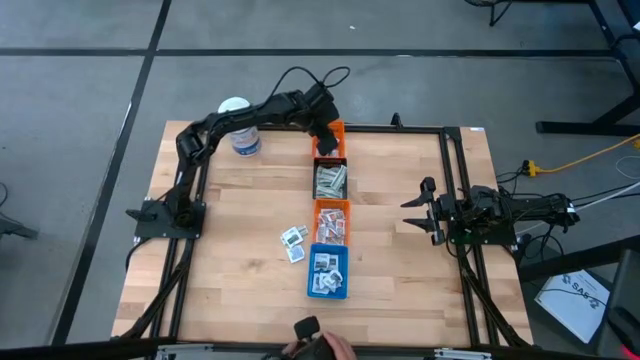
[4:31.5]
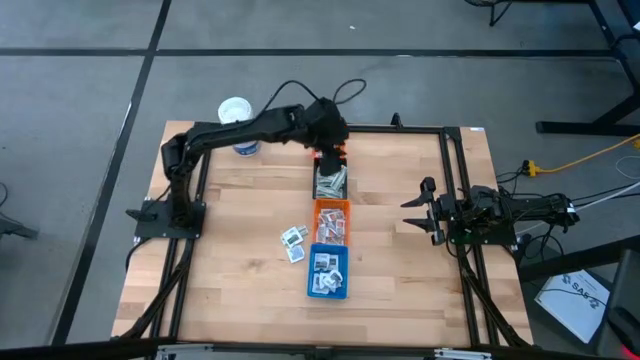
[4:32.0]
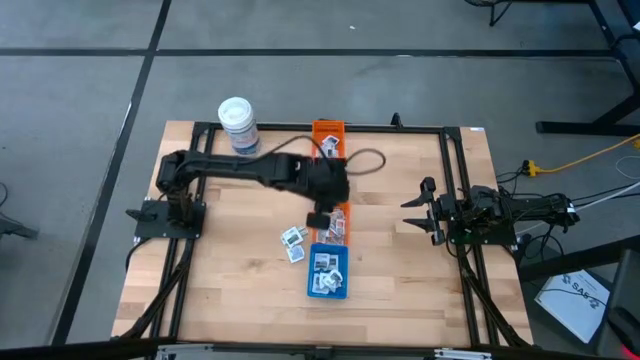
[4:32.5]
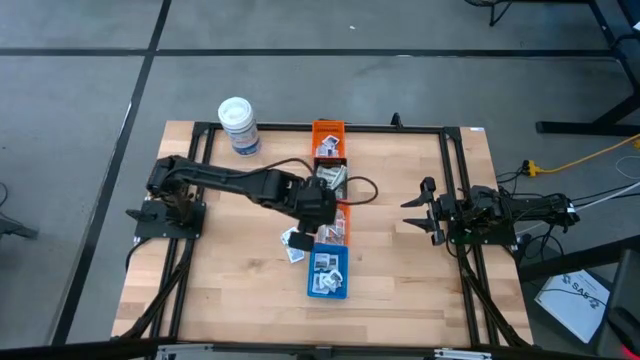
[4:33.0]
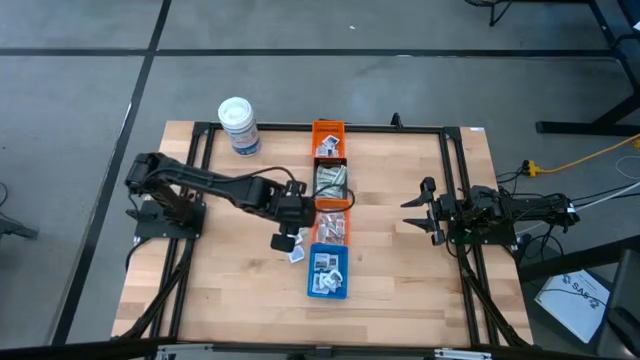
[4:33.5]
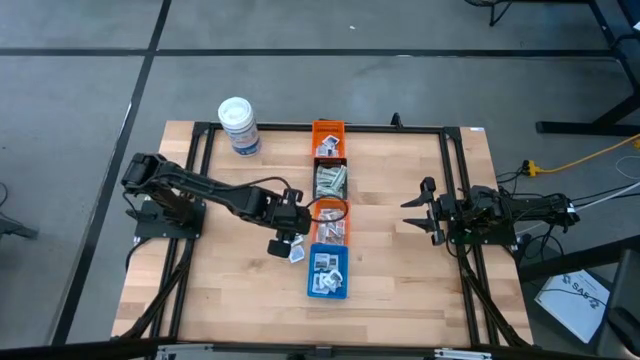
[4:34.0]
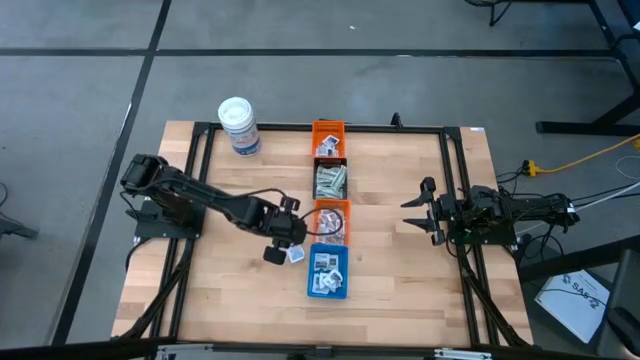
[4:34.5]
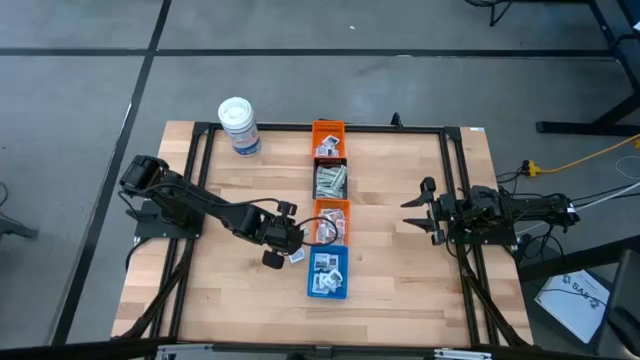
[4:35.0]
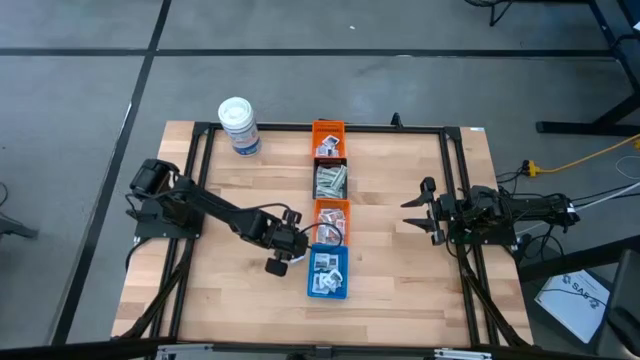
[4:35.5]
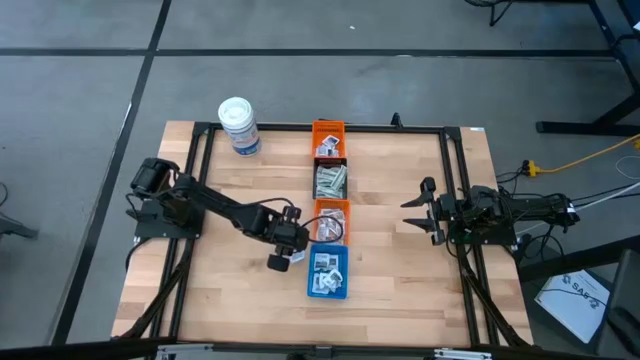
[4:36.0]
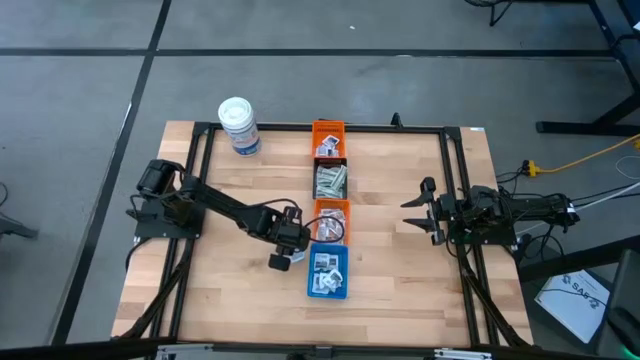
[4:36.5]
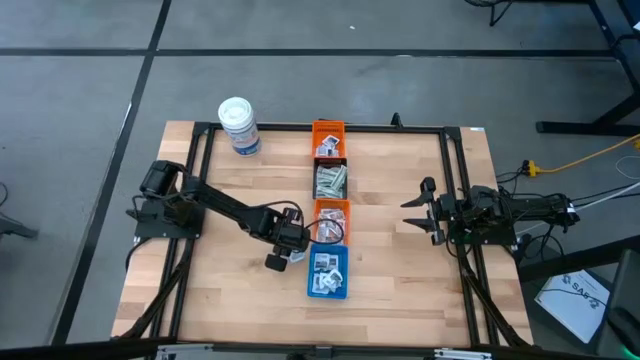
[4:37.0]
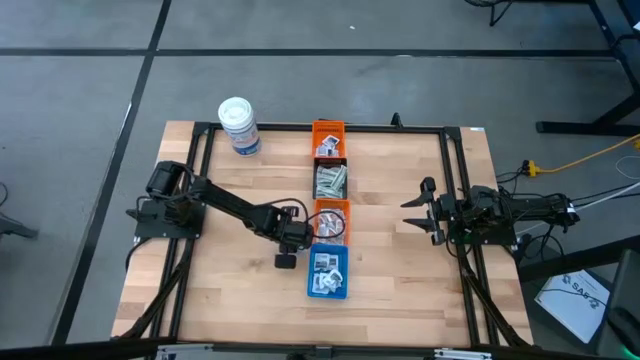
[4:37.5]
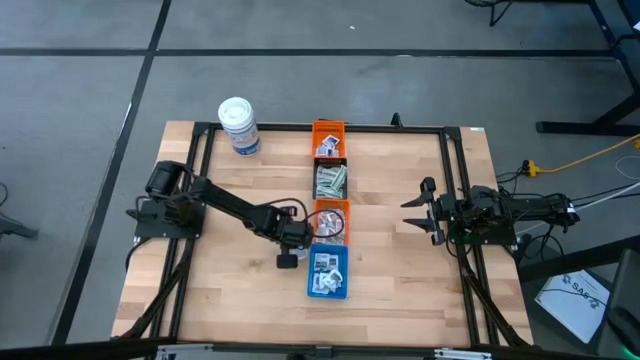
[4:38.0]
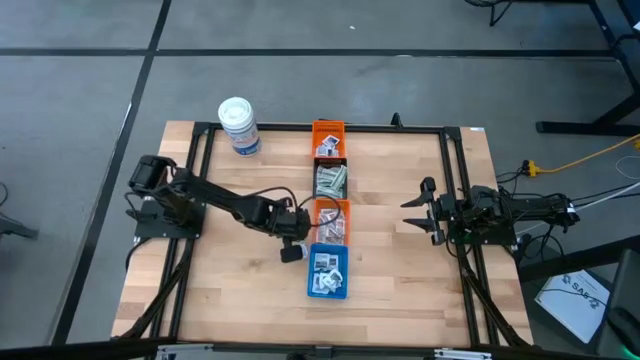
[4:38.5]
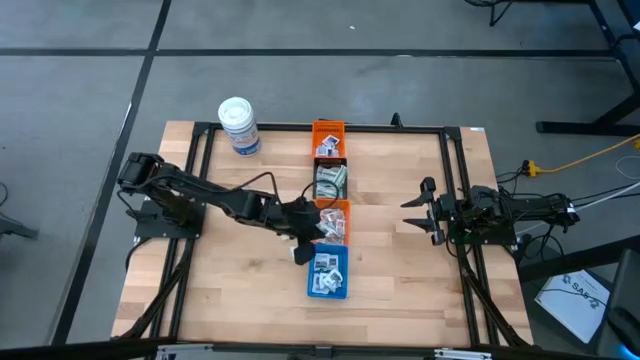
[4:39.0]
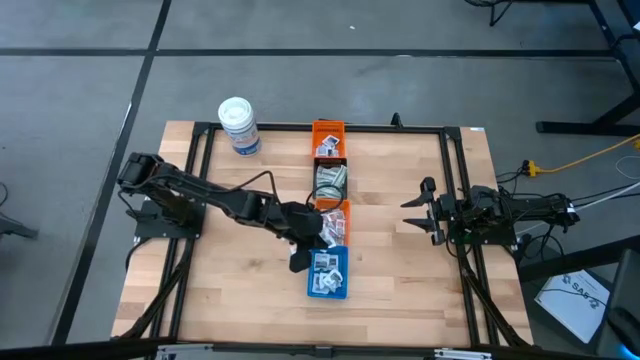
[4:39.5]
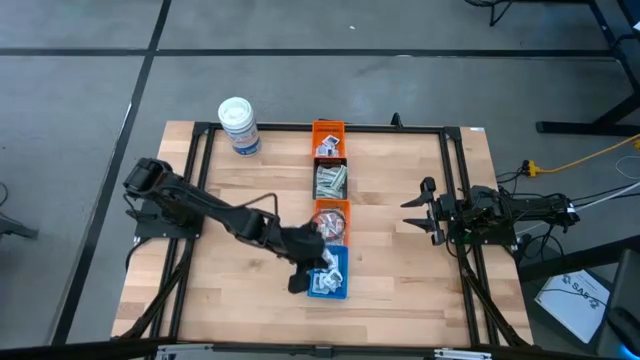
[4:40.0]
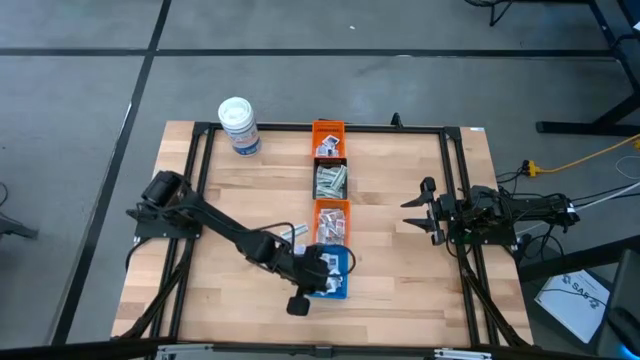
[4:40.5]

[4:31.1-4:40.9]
Task: Pick & Place First Aid Supplies
Put the gray towelette pack into the blue bin

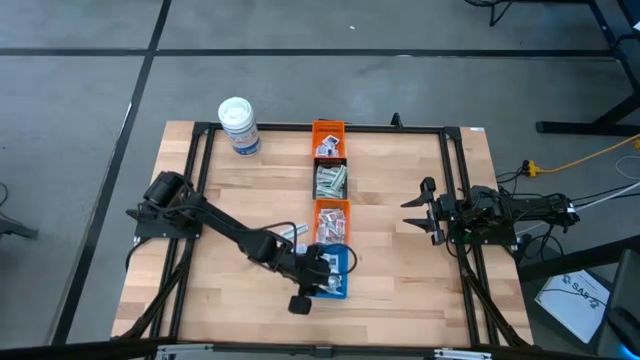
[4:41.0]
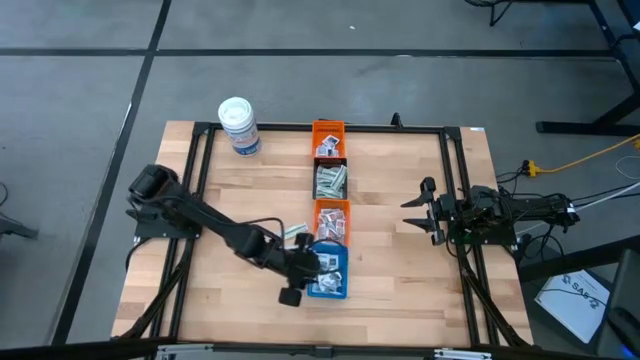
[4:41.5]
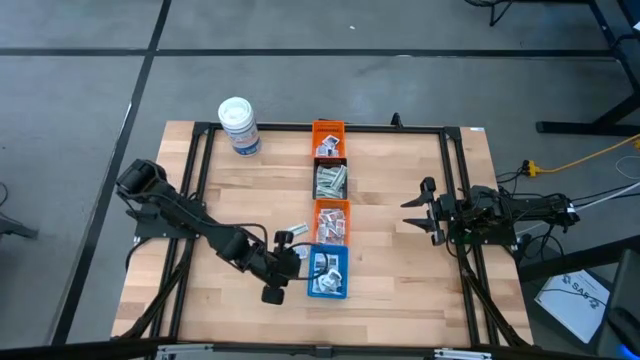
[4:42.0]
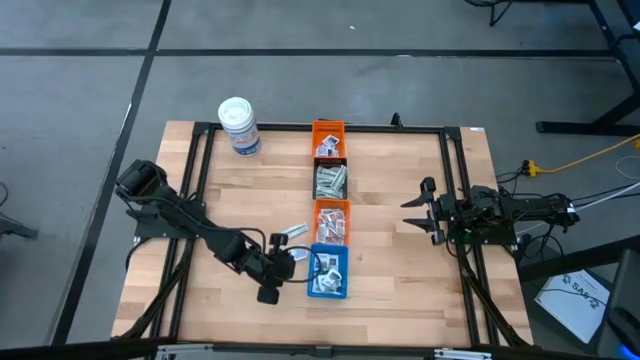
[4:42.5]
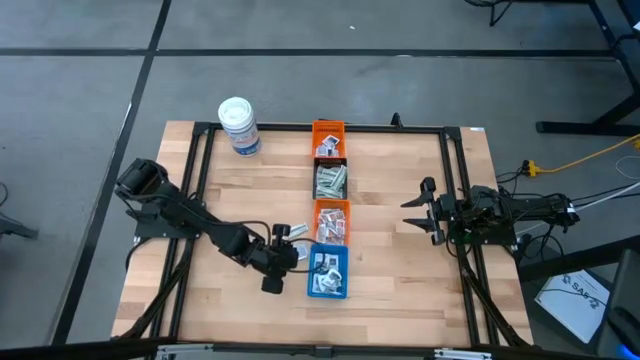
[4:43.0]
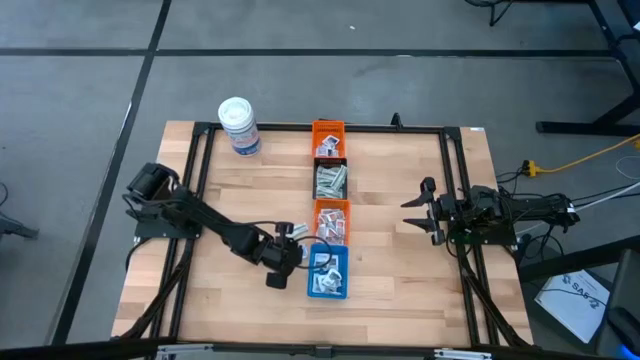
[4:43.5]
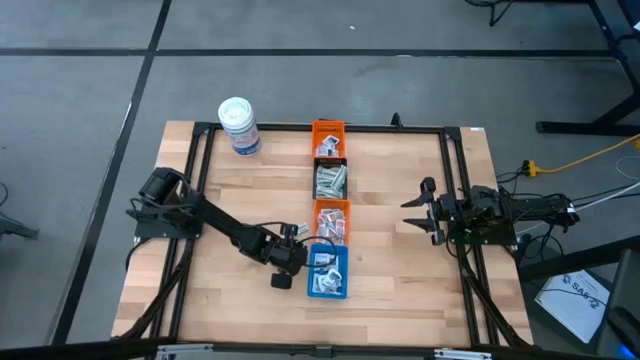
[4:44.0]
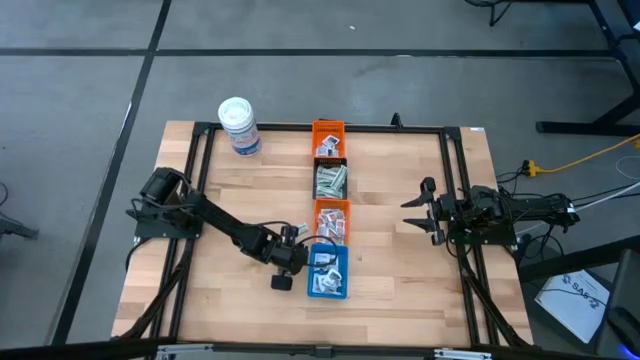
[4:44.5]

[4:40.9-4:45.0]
Put the blue alcohol pad into the top orange bin

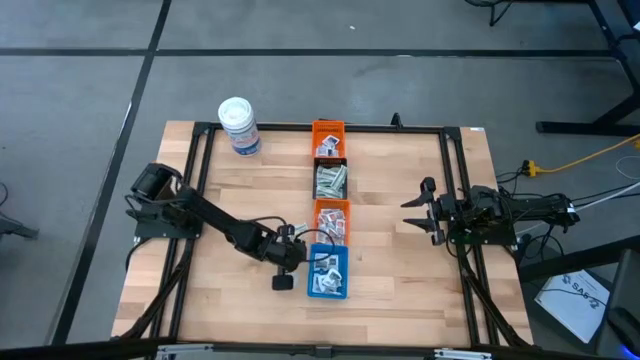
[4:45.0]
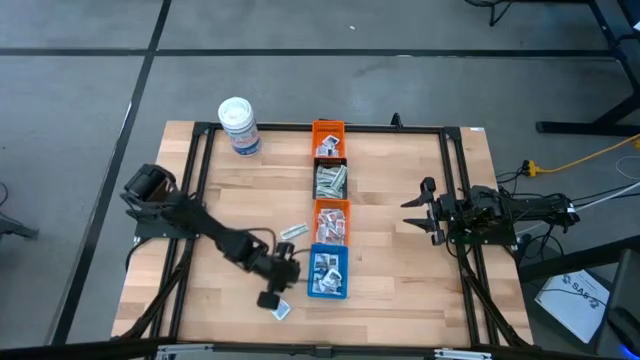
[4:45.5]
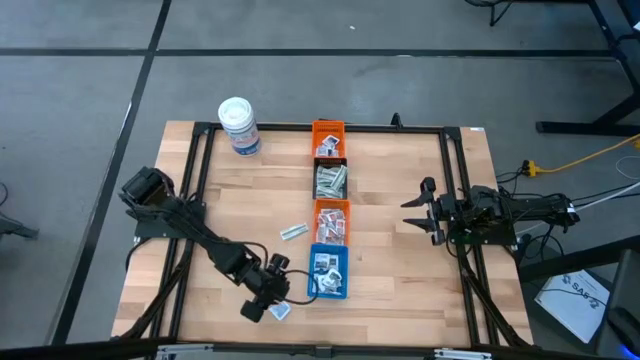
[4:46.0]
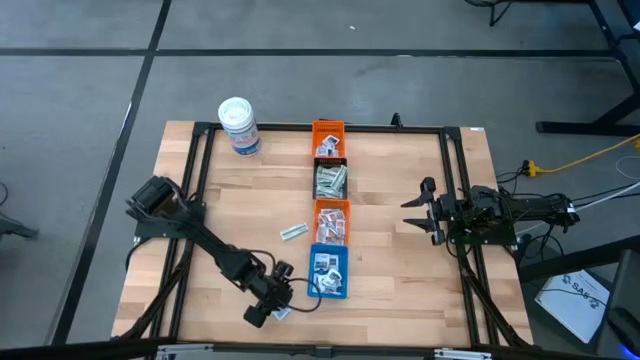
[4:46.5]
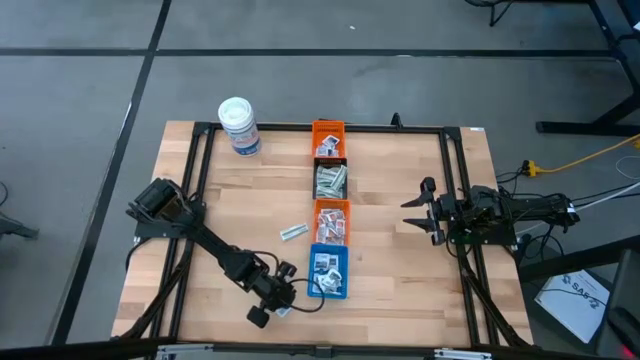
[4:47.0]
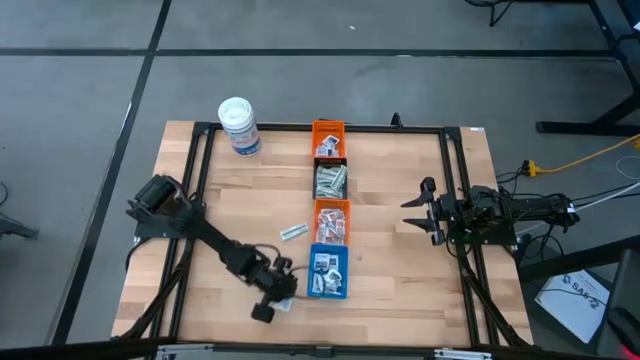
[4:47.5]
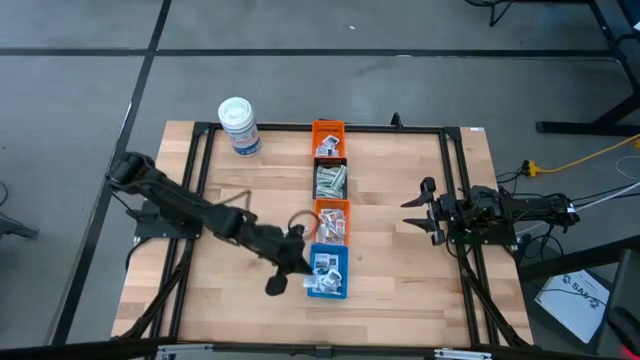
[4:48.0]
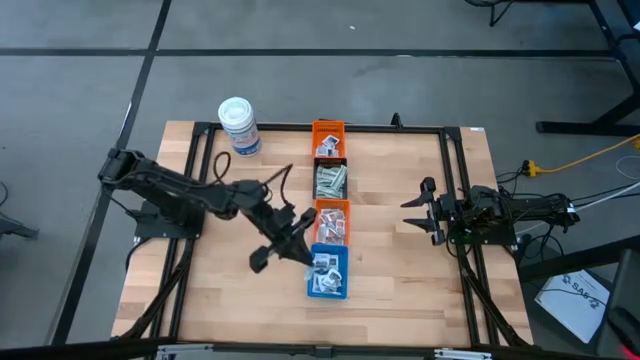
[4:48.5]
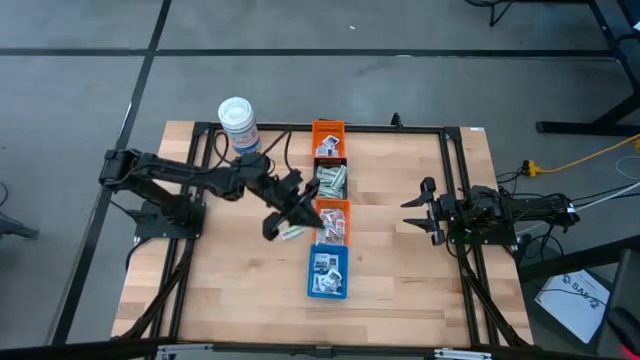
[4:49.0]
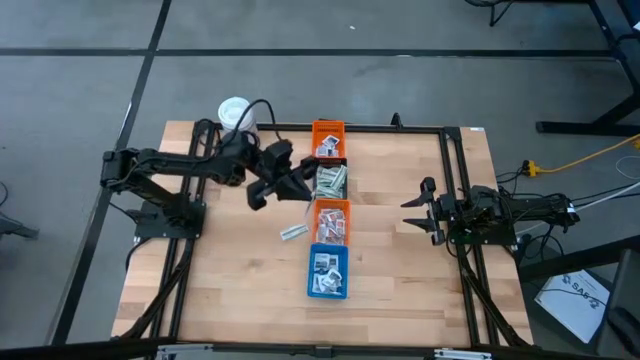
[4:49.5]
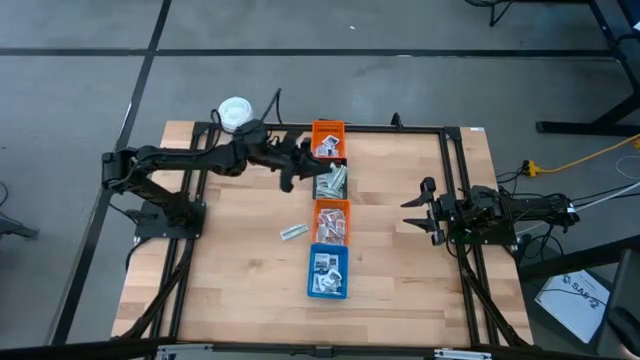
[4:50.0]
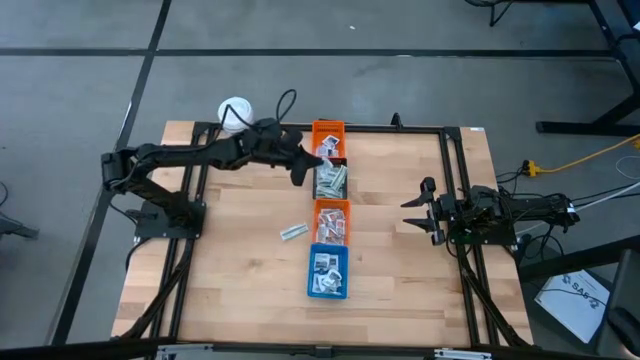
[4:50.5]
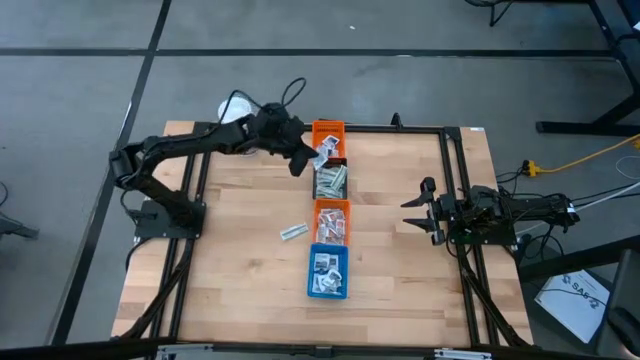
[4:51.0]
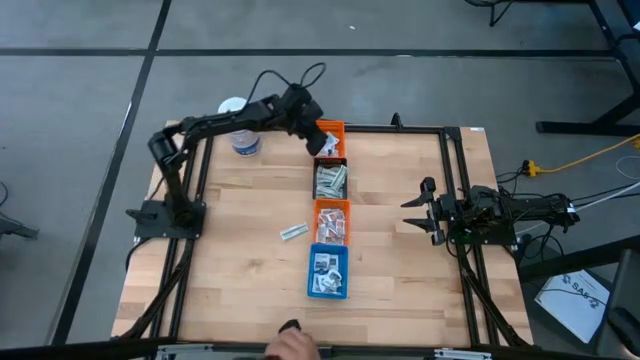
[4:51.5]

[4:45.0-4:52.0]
Put the blue alcohol pad into the top orange bin

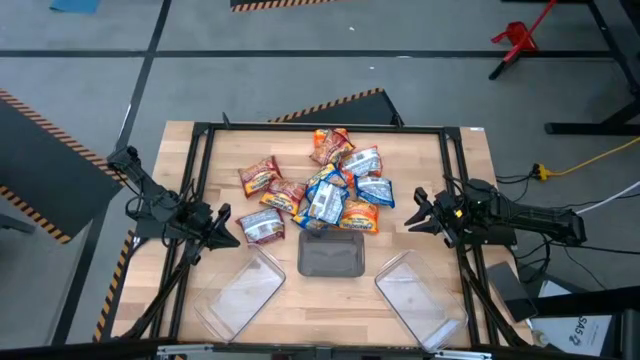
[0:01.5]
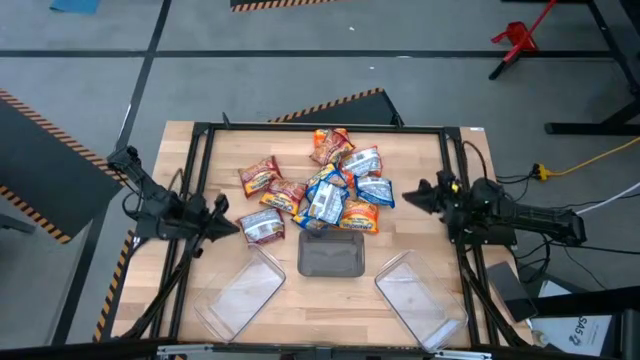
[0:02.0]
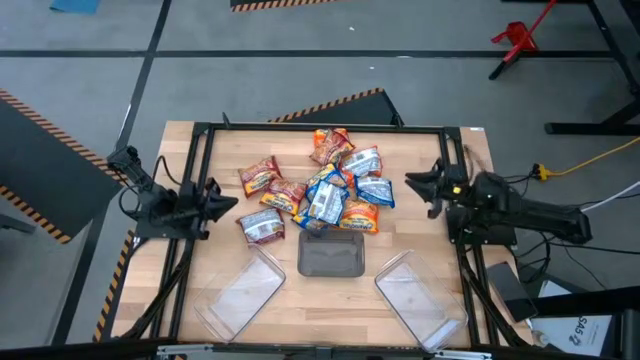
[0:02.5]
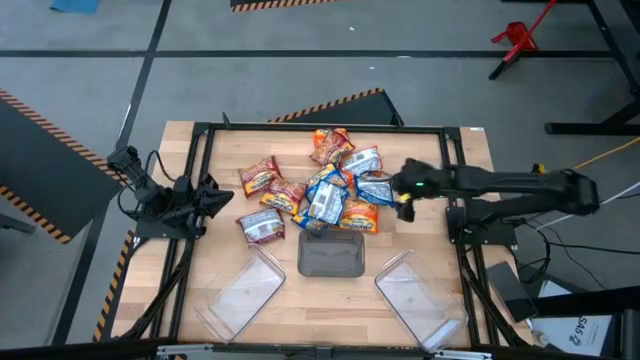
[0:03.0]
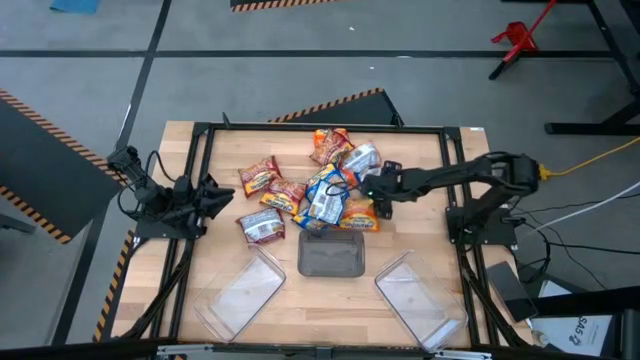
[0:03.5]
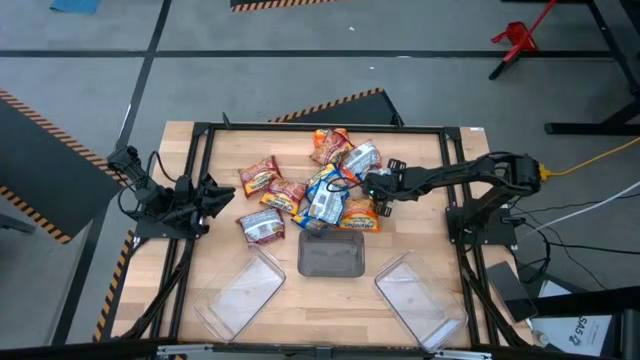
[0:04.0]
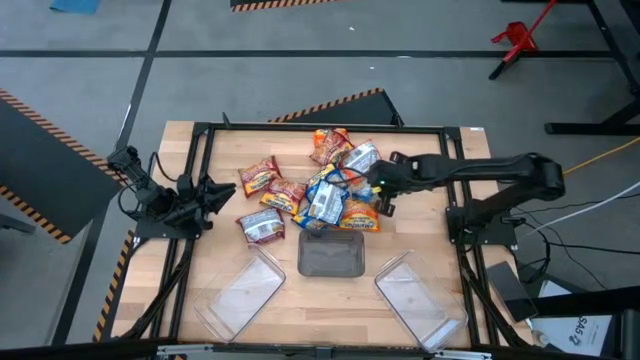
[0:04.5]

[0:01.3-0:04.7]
Task: Sort Maruchan noodles
Put the blue noodle pack into the right transparent bin
